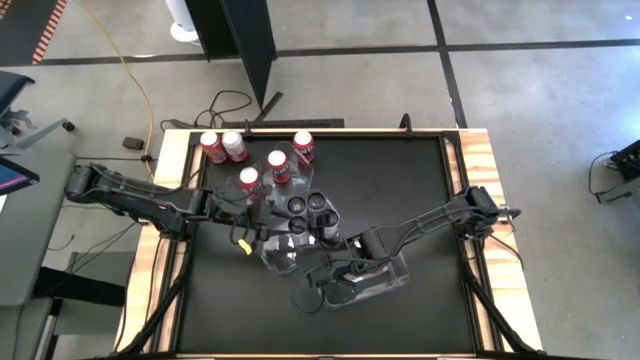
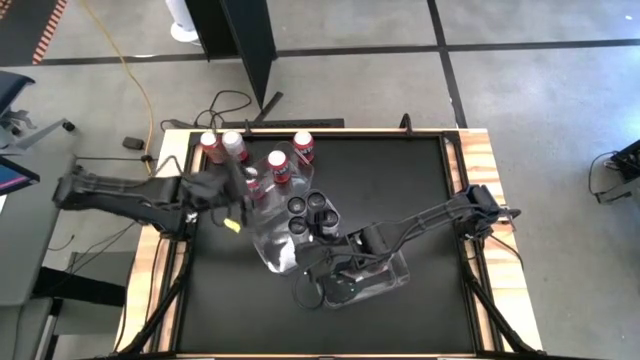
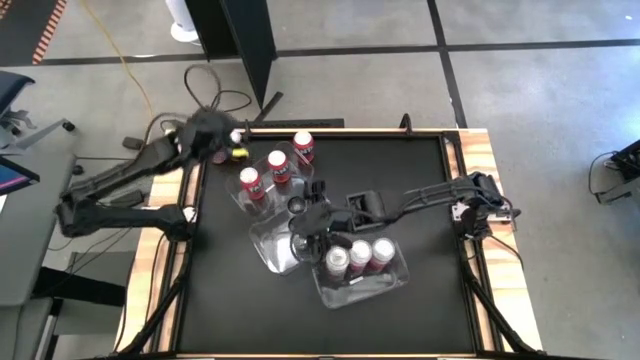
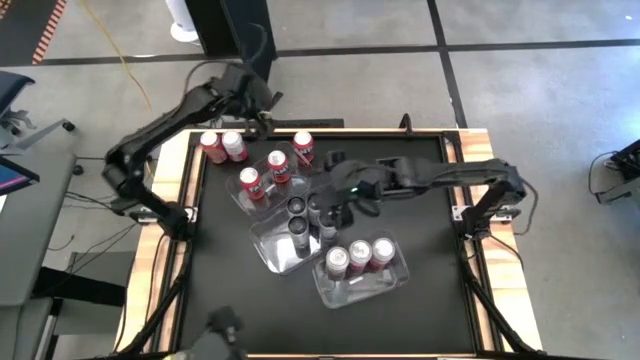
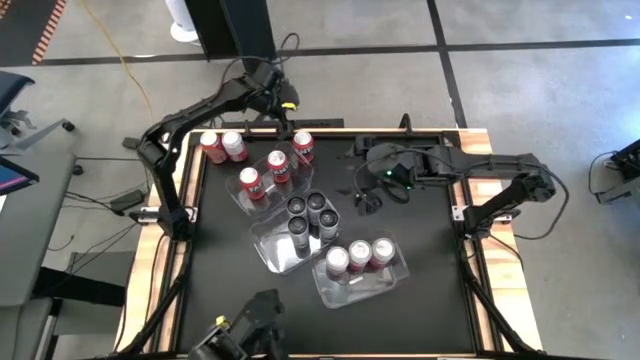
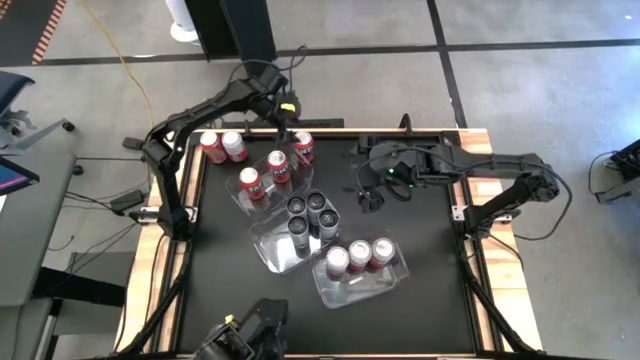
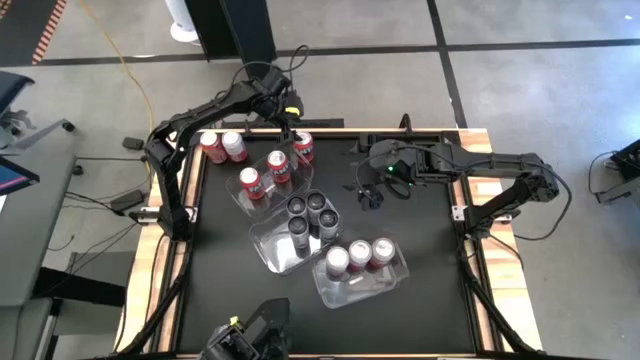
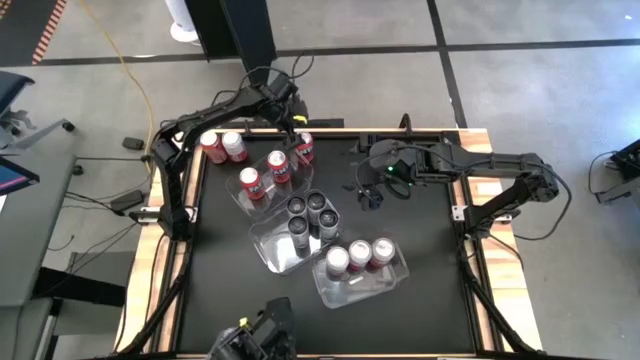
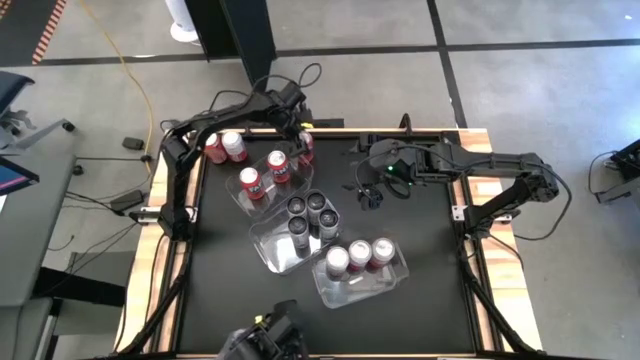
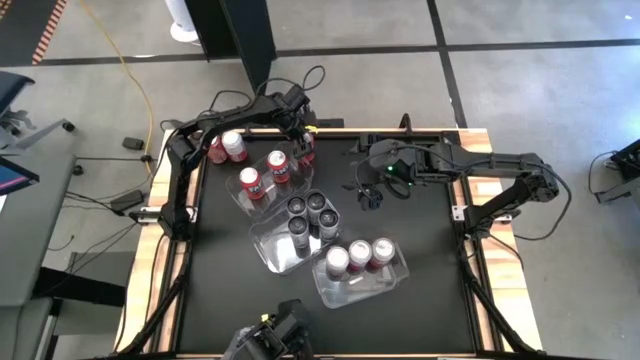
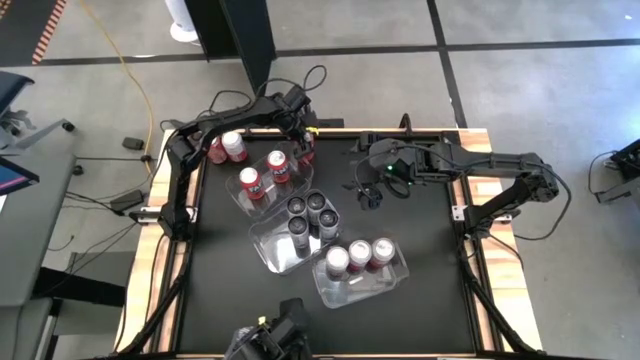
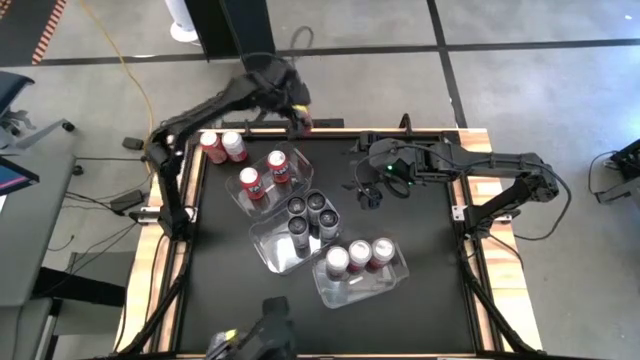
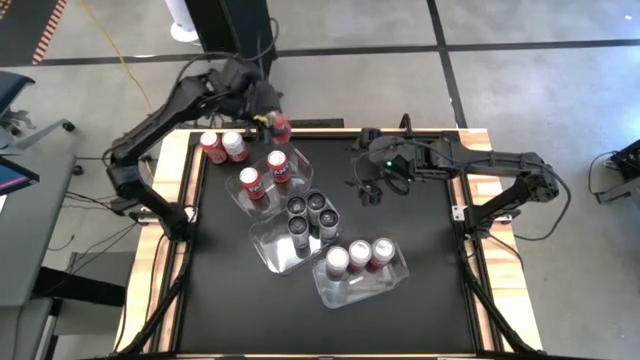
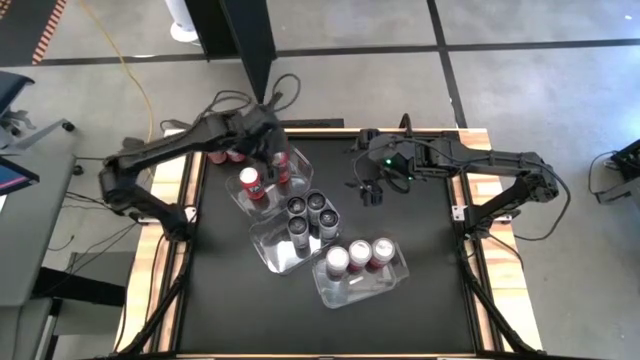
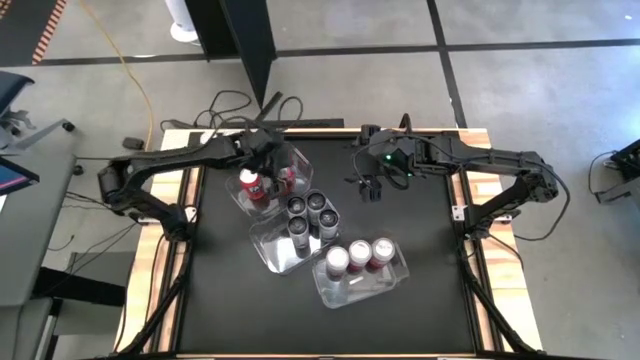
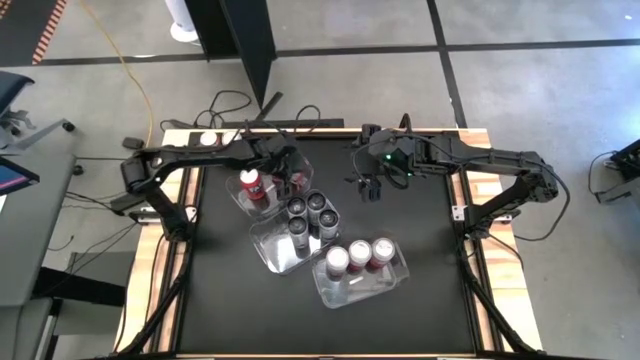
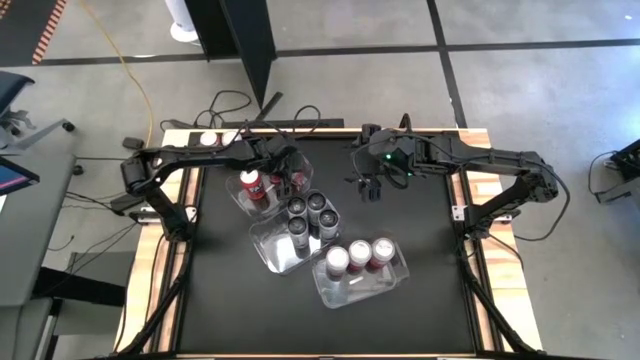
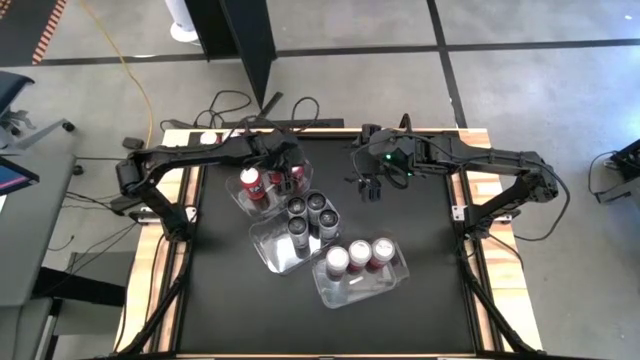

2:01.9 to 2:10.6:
Task: Sort soda cans
Put the right orange soda can in the top left transparent bin

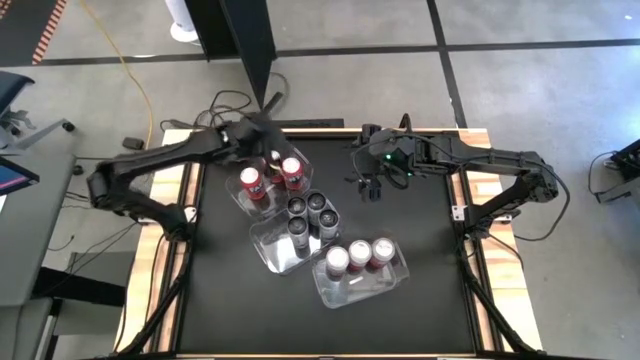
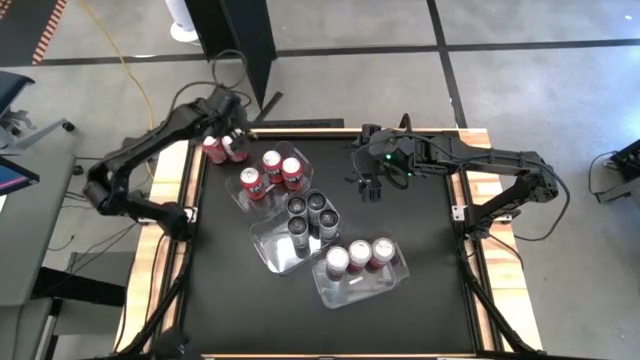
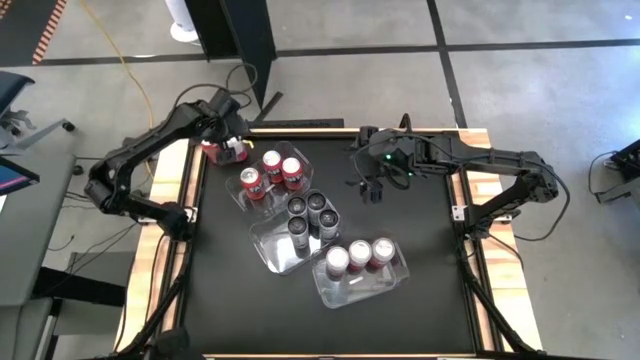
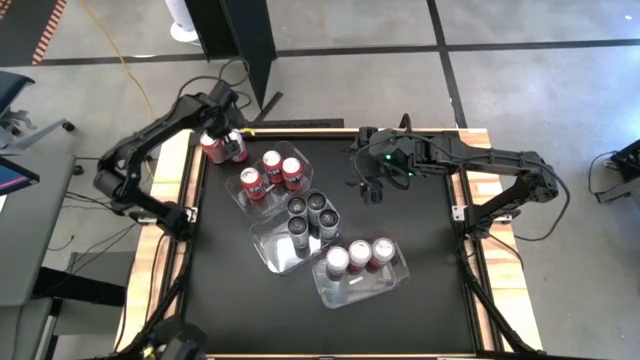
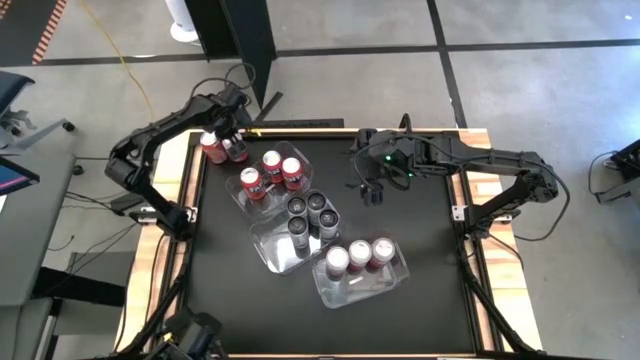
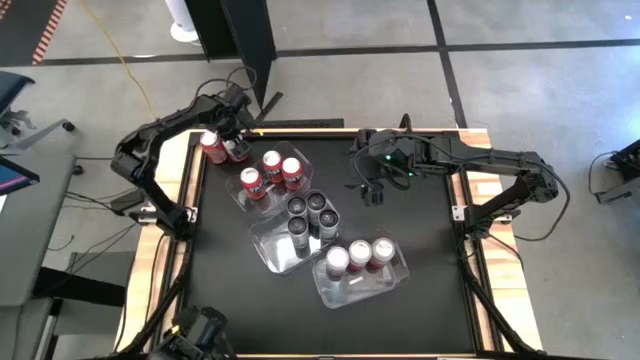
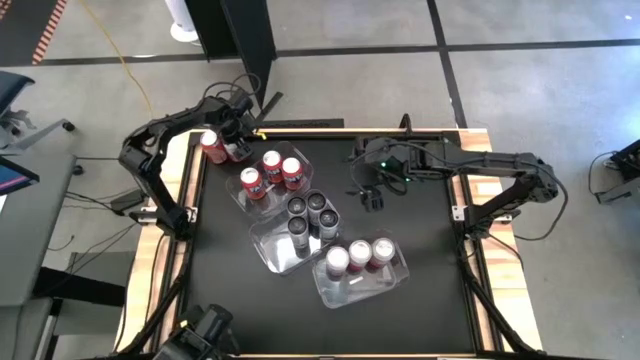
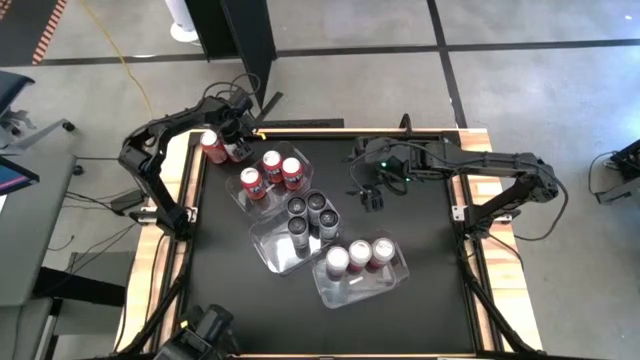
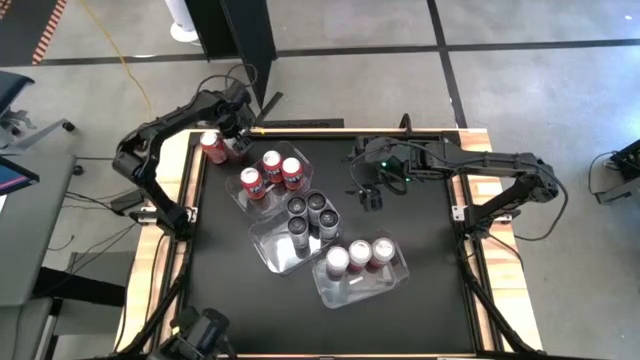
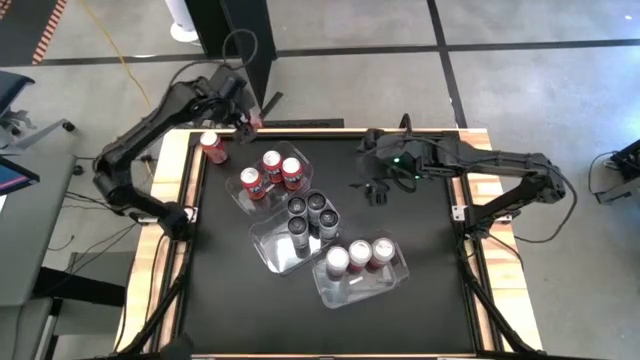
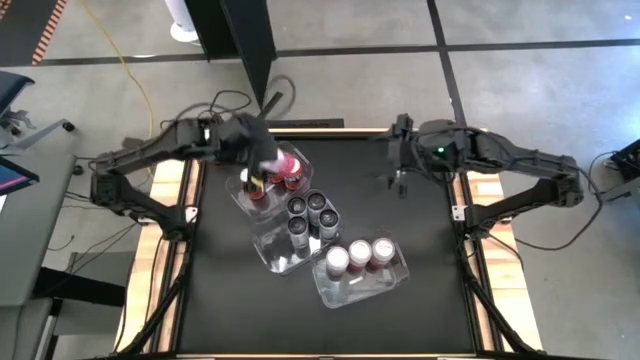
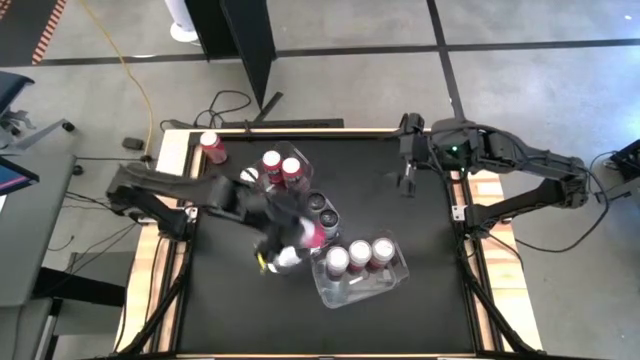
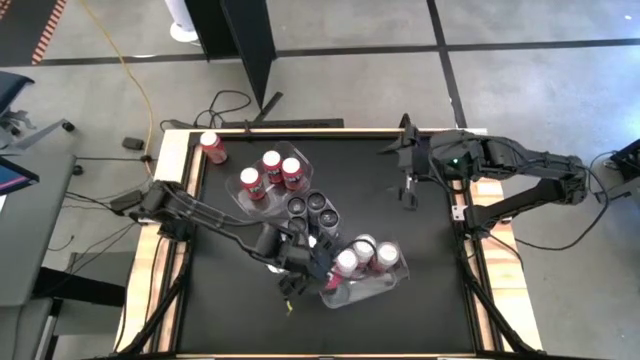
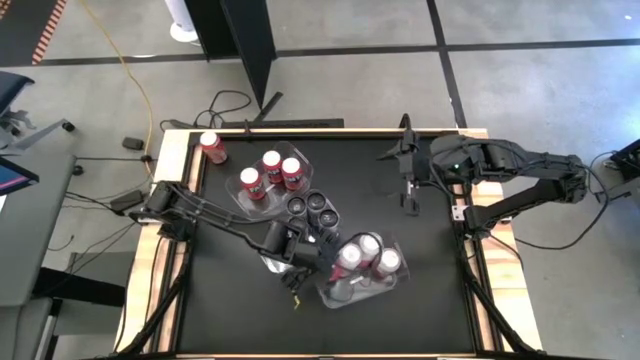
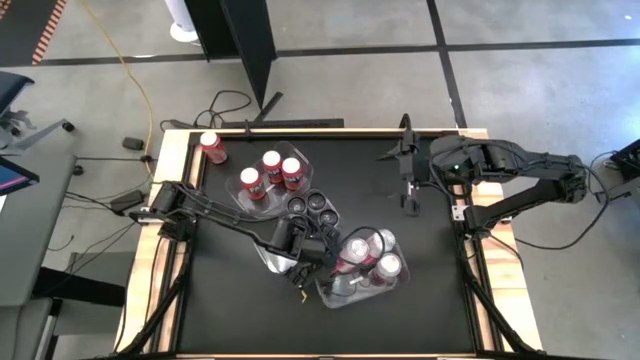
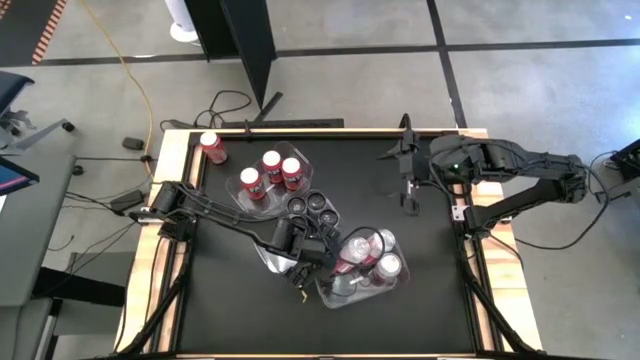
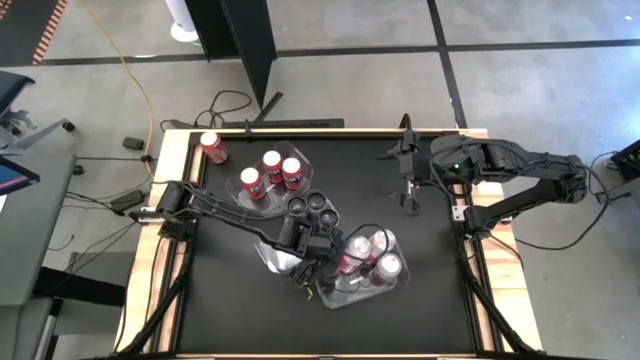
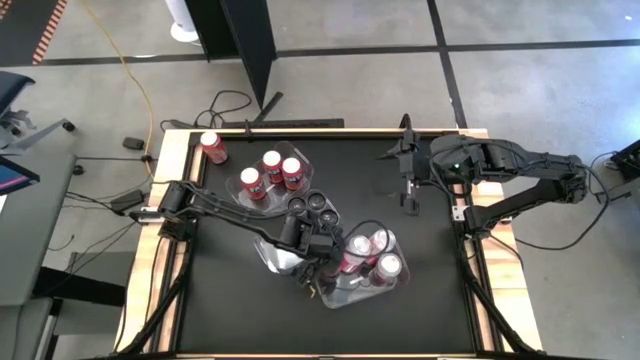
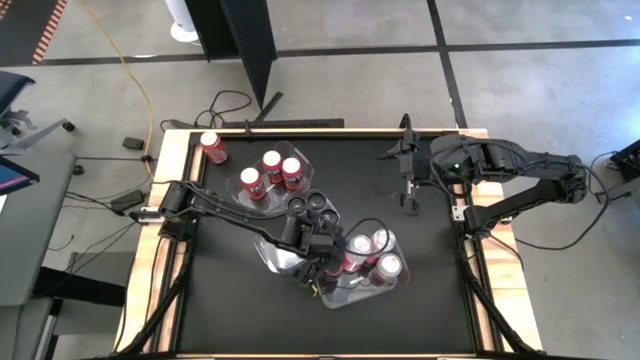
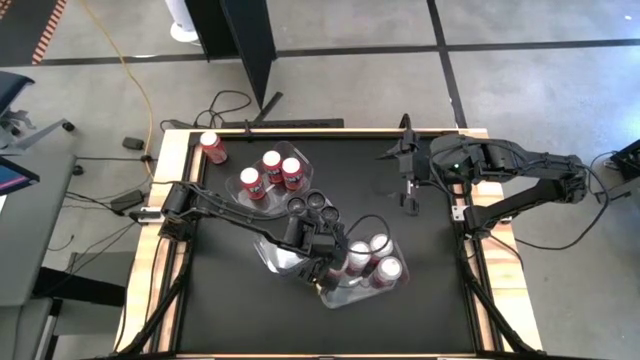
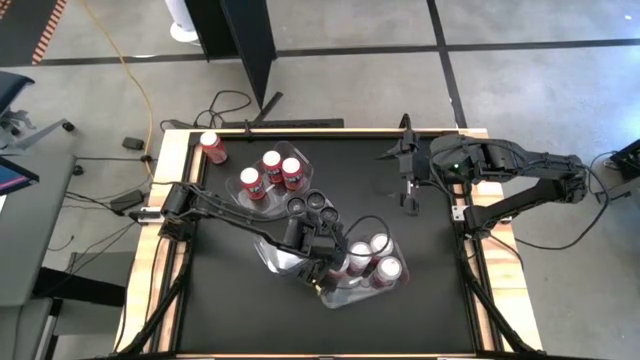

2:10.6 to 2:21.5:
Put the pink soda can in the bottom right transparent bin
